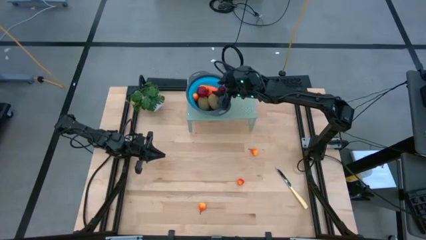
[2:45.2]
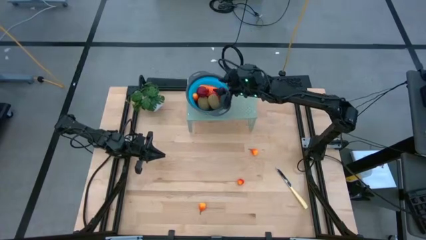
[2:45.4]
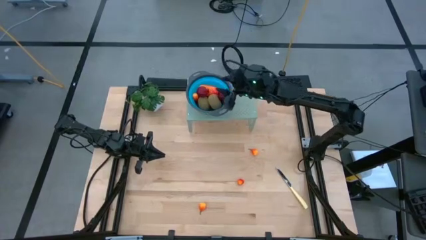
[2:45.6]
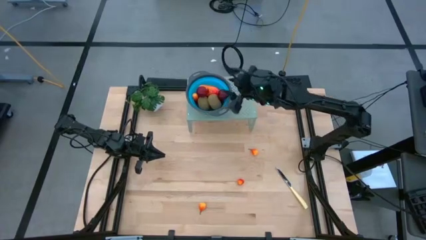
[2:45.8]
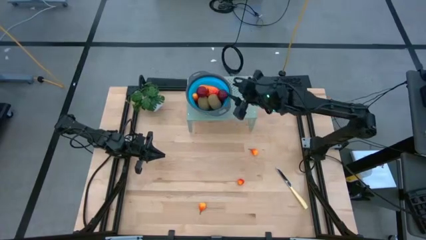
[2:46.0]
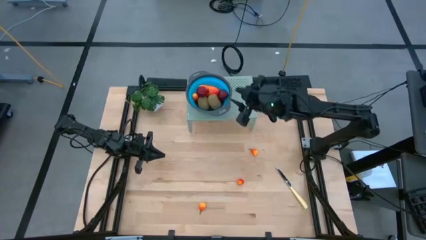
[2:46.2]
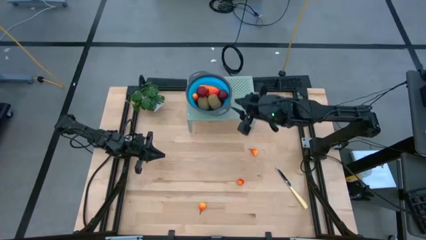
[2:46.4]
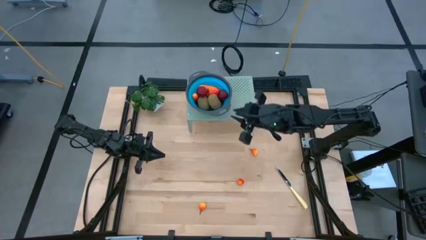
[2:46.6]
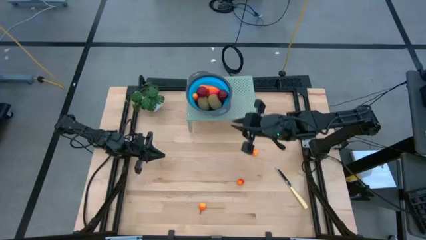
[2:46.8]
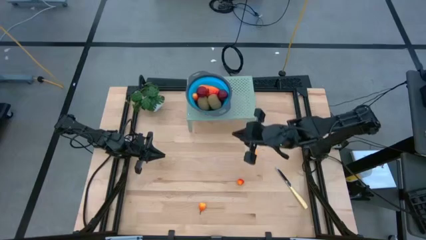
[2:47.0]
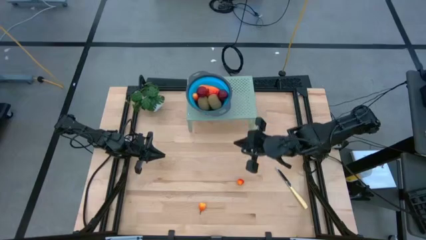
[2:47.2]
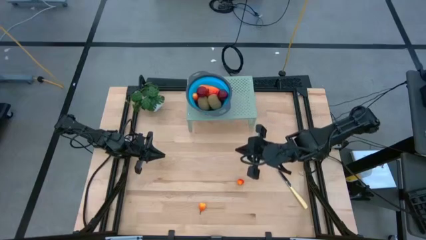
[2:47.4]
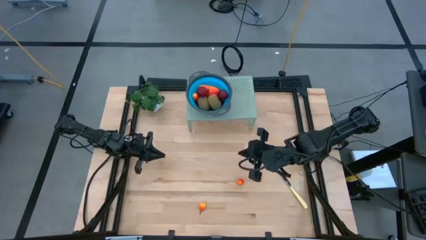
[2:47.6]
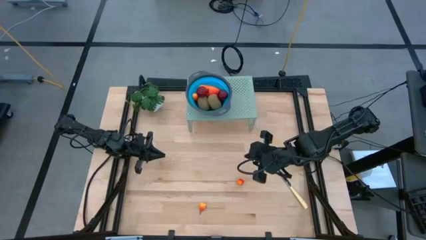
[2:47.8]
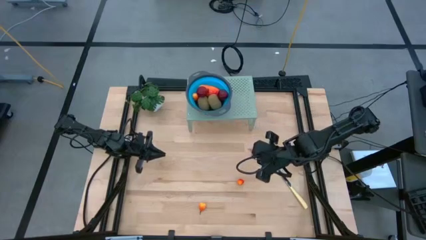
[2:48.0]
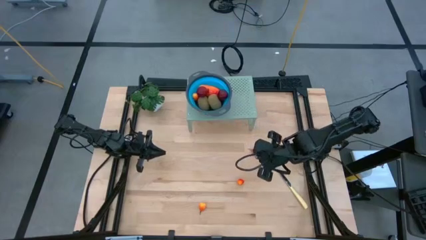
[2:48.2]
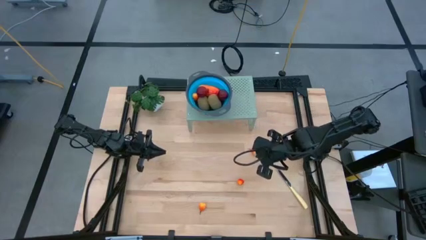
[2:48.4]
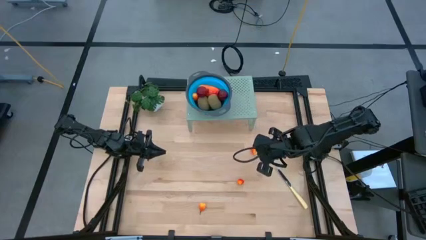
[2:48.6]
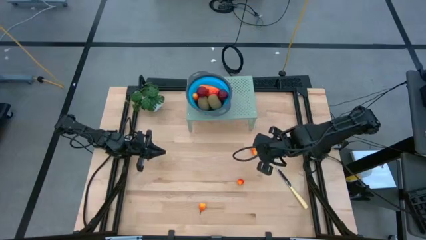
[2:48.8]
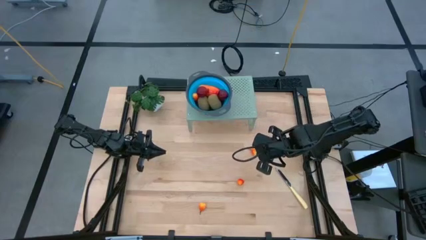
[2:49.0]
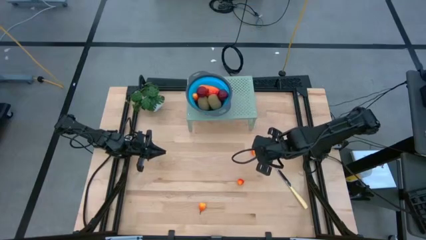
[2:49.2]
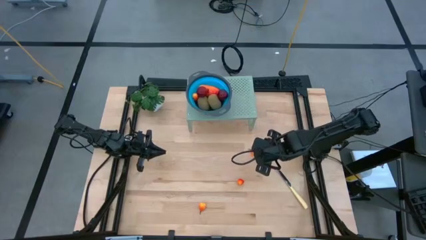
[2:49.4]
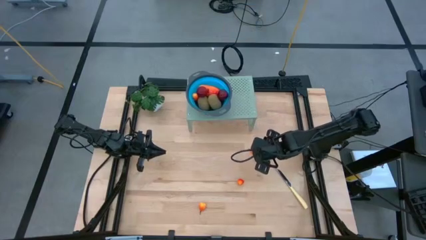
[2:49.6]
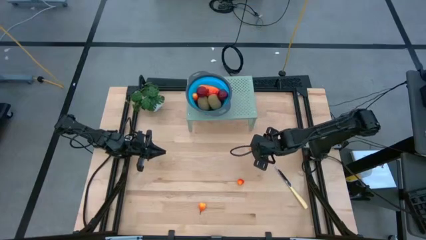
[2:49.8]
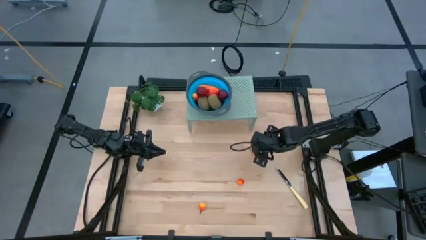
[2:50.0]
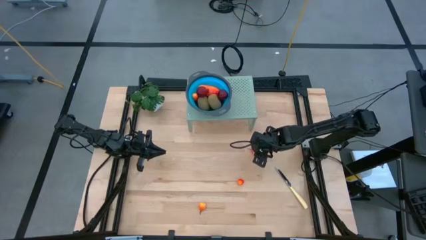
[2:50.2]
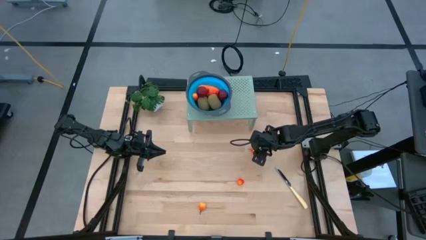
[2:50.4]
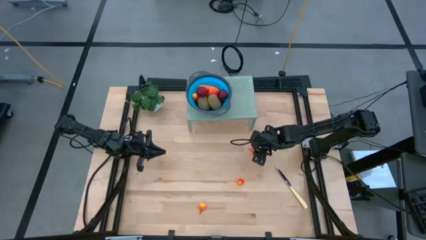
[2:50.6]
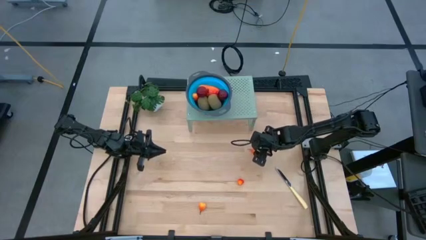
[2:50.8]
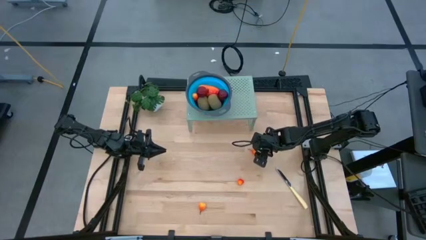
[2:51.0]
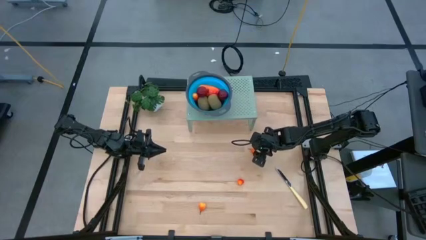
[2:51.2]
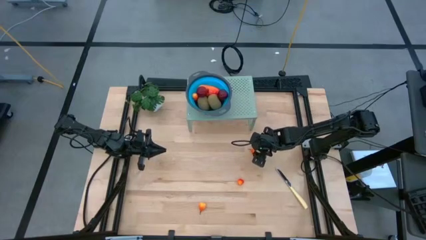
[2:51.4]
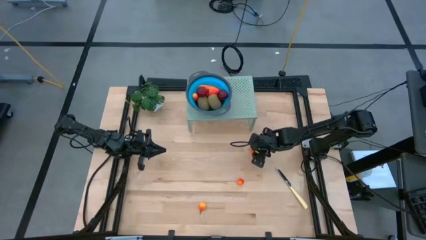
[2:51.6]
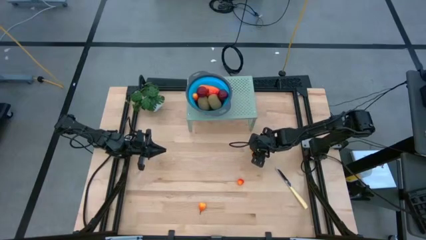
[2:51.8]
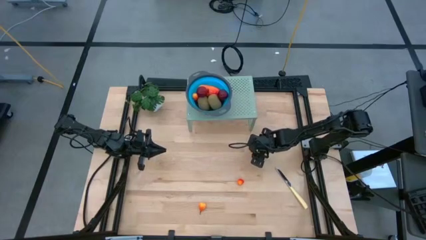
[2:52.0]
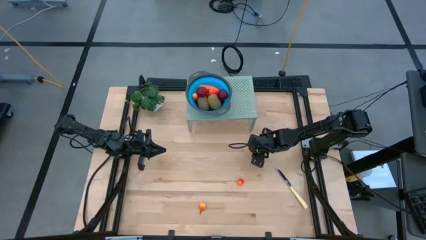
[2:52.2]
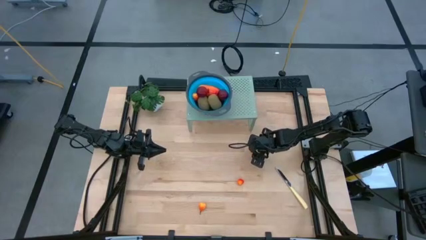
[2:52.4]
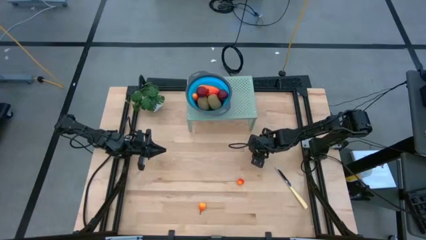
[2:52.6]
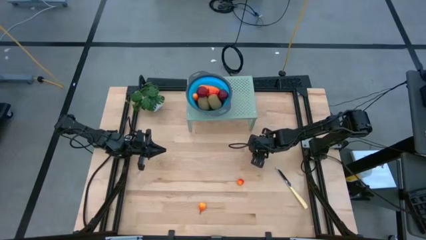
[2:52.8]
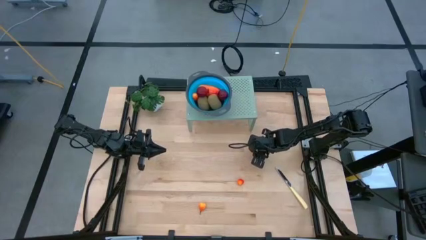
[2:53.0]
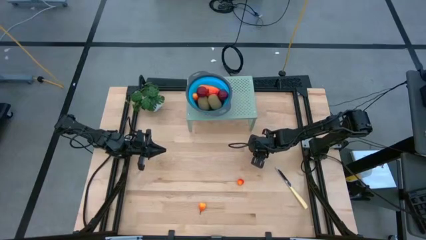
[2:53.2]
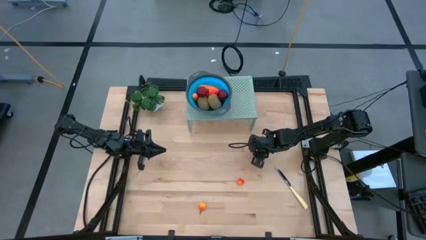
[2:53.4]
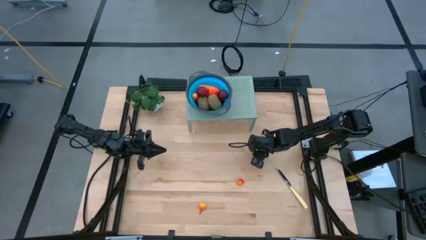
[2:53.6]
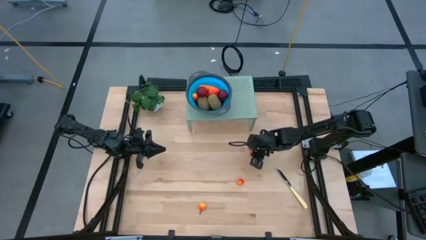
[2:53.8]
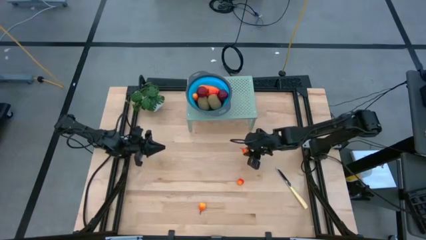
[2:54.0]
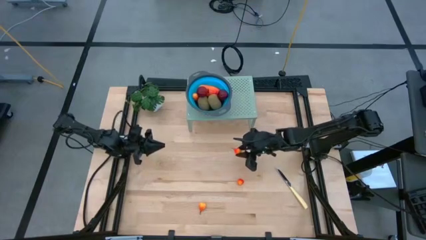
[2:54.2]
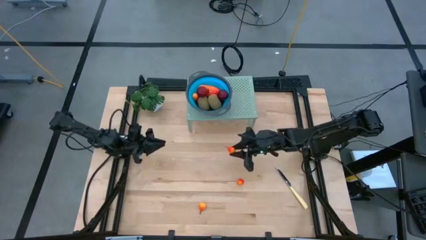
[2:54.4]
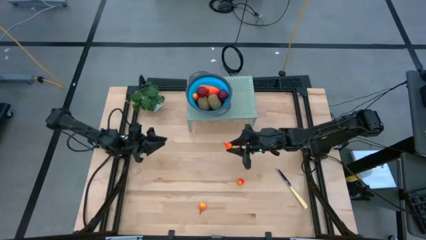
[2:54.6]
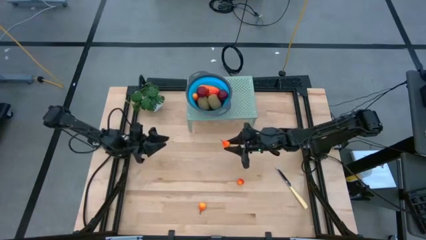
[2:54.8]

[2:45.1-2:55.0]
Task: Pick & Place Fruit
Put the orange pear into the blue bowl on the shelf

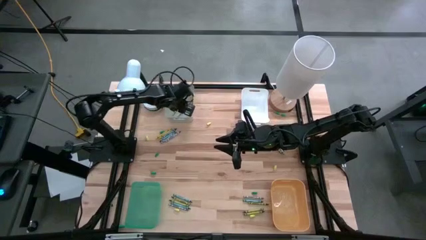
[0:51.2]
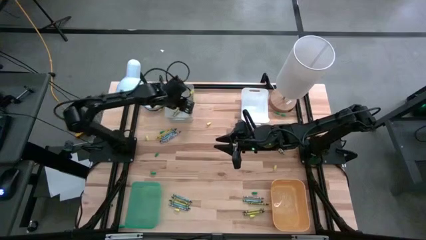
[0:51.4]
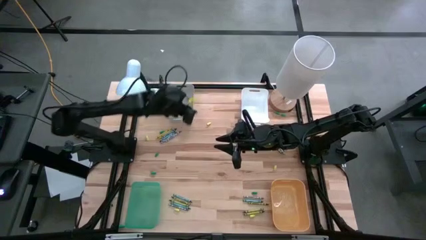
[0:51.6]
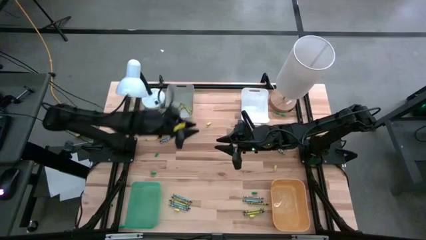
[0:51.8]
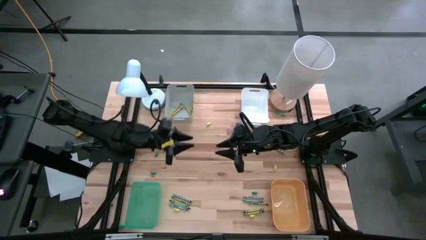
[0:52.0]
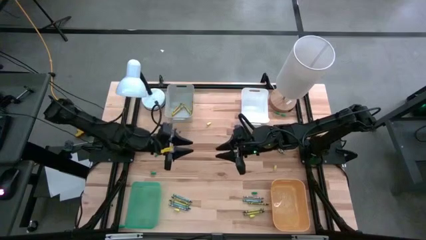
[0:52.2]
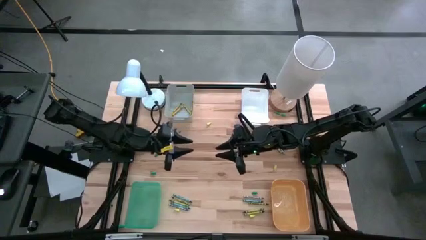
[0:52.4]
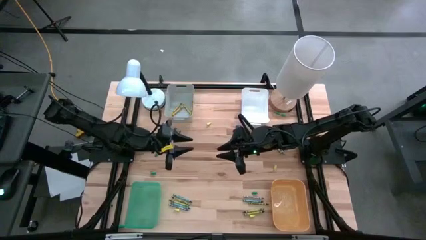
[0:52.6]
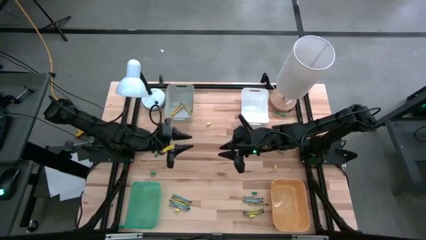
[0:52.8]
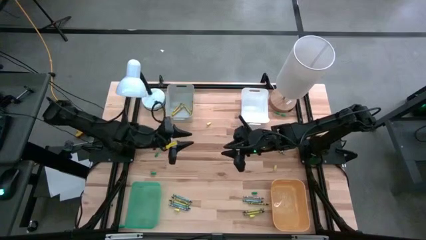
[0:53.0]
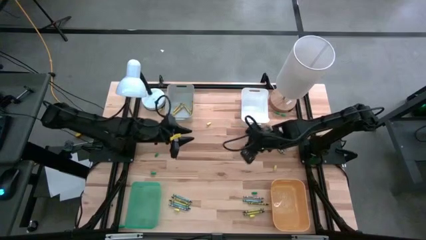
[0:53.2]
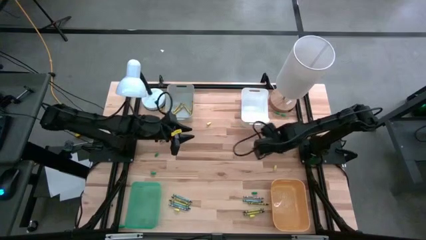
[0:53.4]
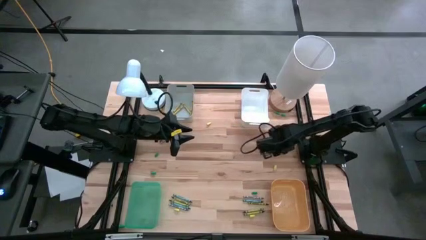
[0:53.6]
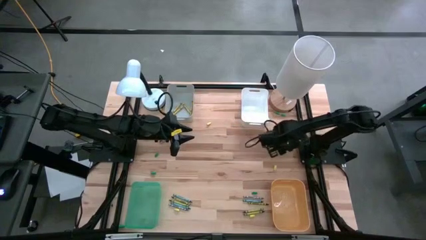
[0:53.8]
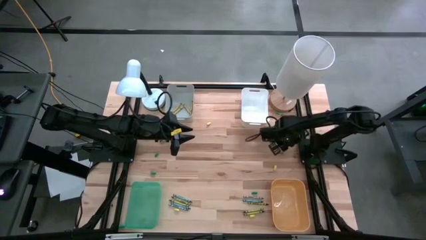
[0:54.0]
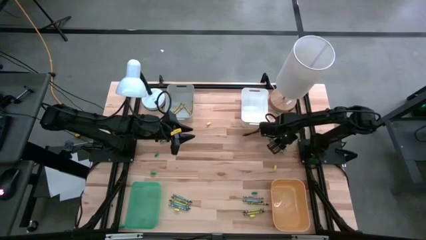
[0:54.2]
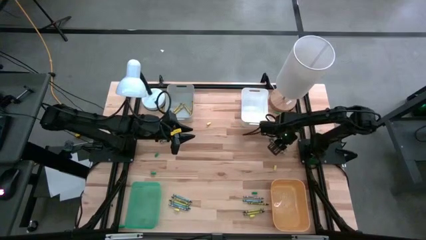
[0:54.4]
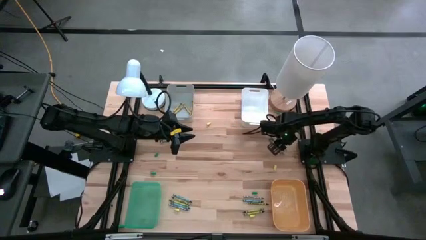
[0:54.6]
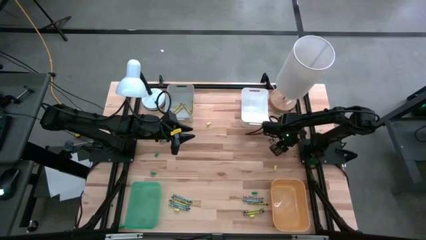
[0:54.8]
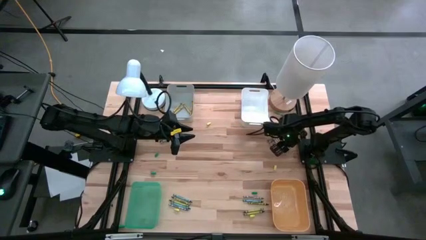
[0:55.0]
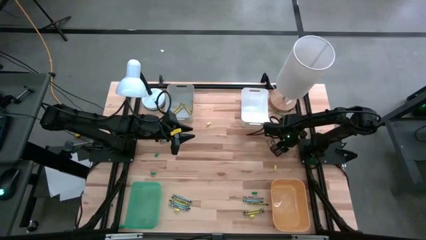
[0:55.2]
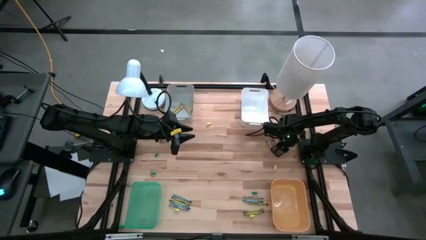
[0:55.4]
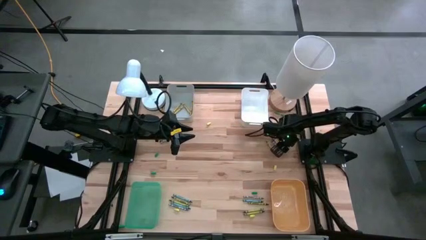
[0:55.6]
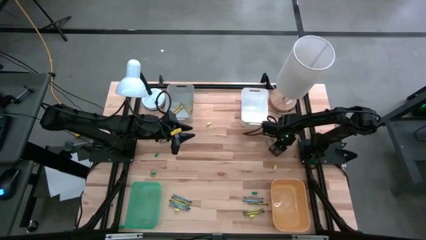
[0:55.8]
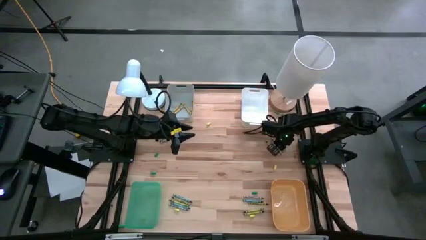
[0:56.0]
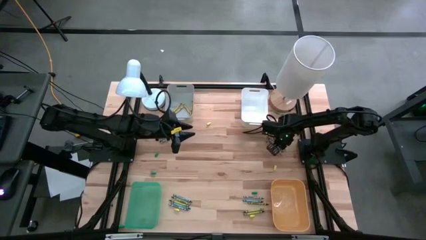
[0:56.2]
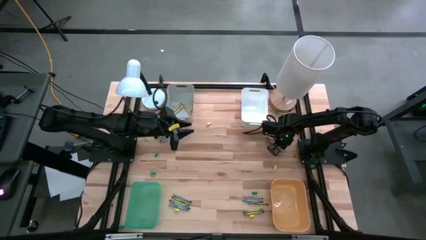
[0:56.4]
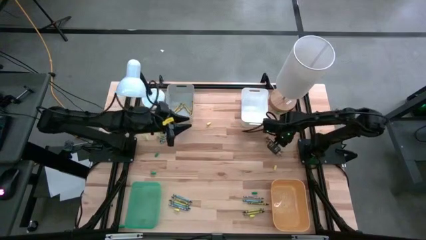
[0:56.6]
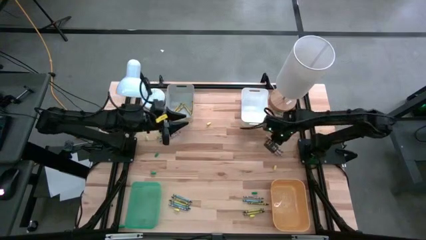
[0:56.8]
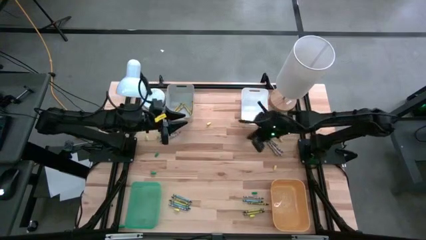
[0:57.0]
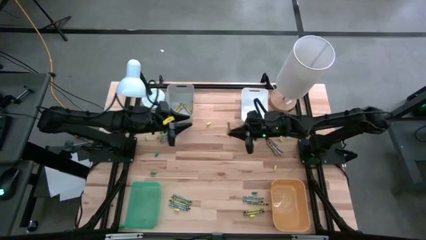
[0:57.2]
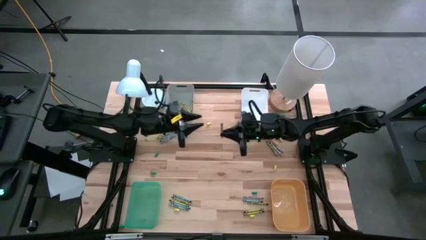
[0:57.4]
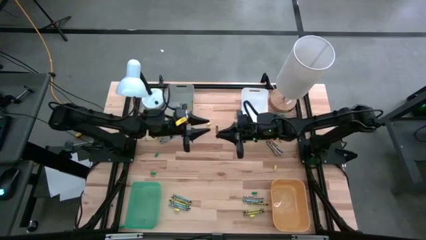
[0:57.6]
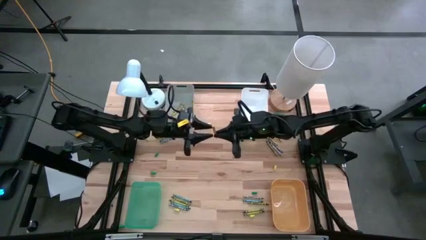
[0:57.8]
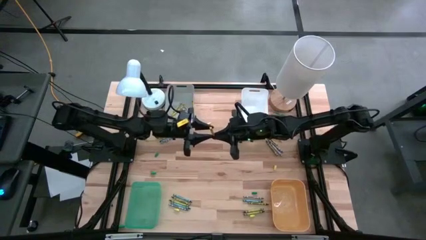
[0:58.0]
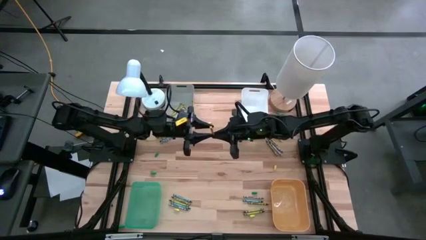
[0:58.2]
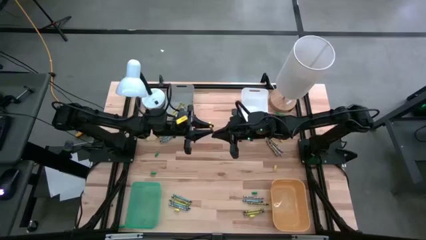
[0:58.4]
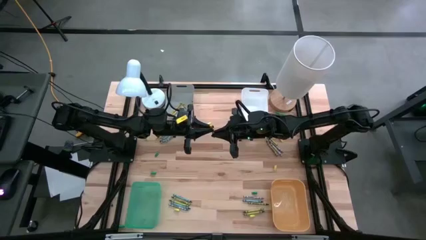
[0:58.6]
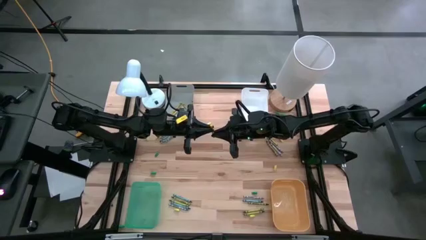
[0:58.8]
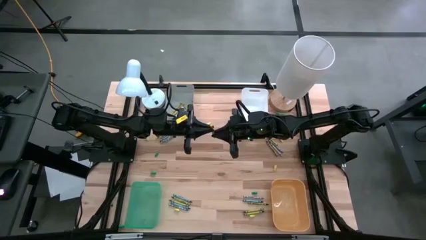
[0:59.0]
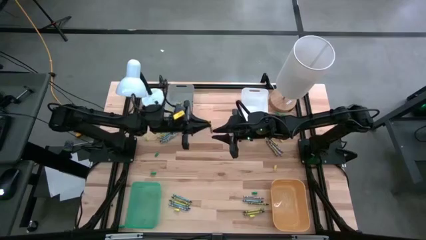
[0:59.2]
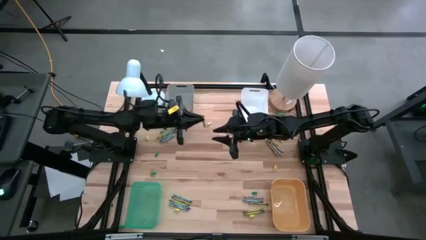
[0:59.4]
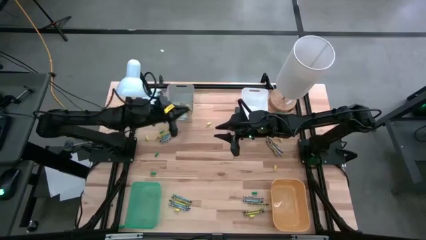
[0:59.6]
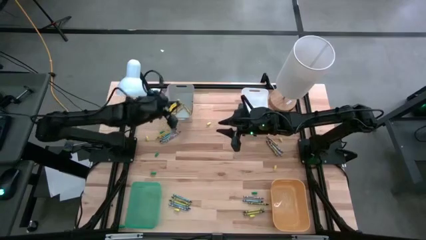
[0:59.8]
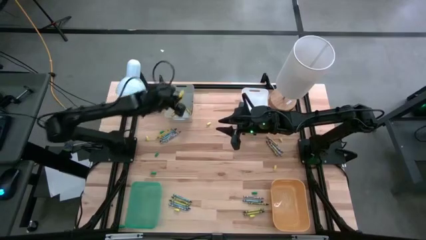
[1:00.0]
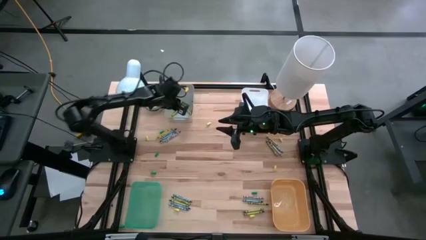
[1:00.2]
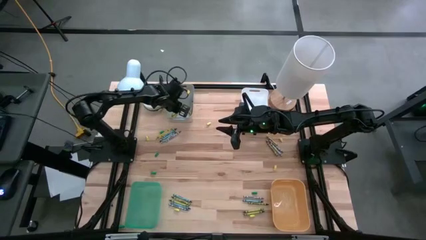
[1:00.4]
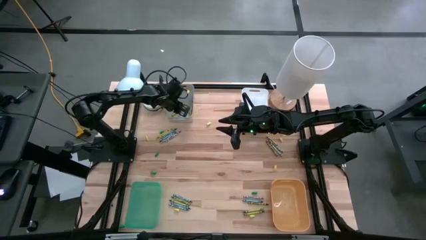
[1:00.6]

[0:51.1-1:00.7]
Task: Sort crayons
Put the yellow crayon into the gray bin
